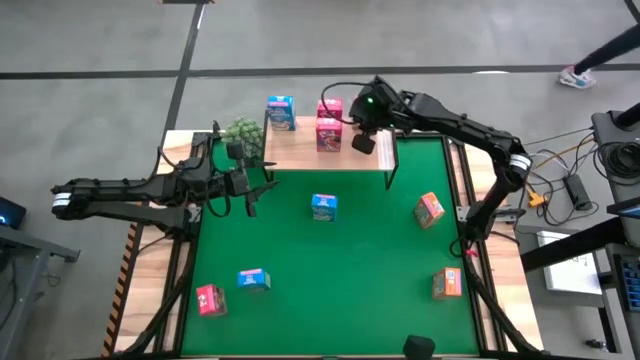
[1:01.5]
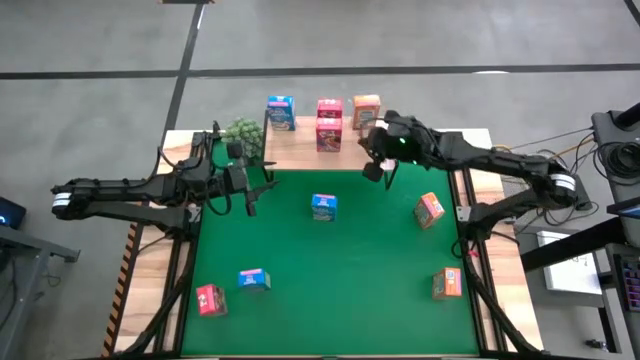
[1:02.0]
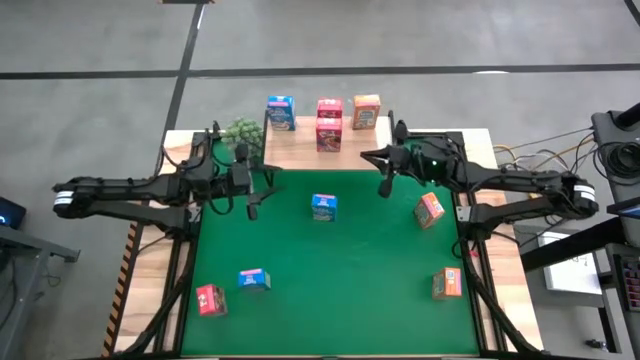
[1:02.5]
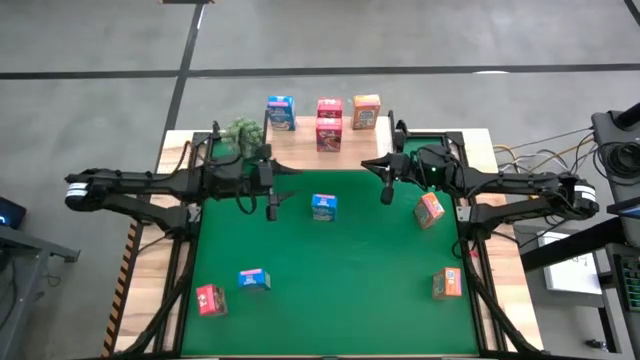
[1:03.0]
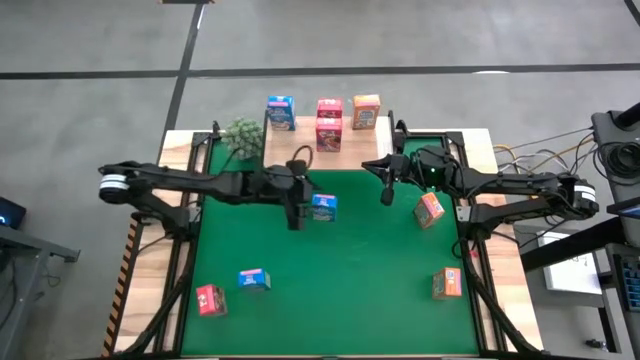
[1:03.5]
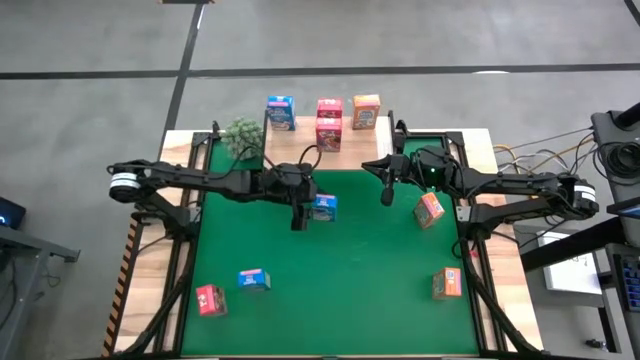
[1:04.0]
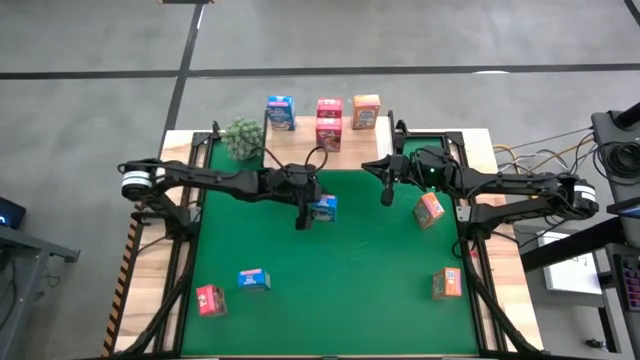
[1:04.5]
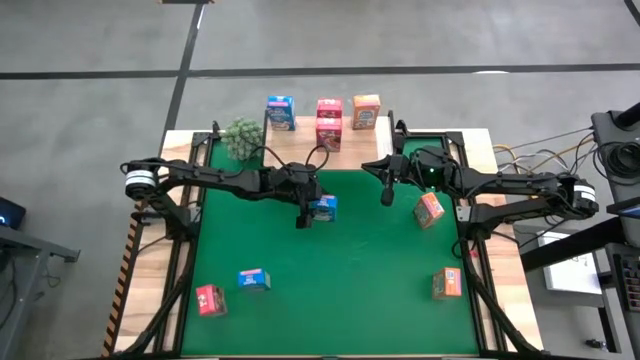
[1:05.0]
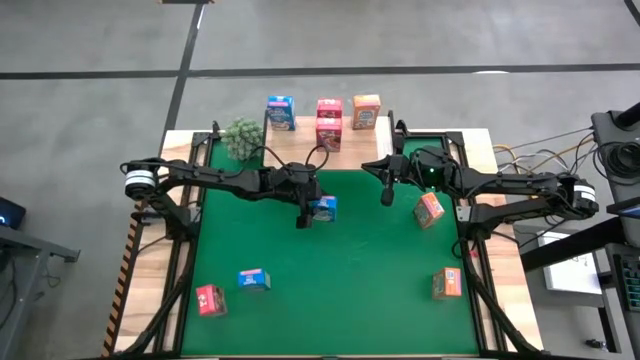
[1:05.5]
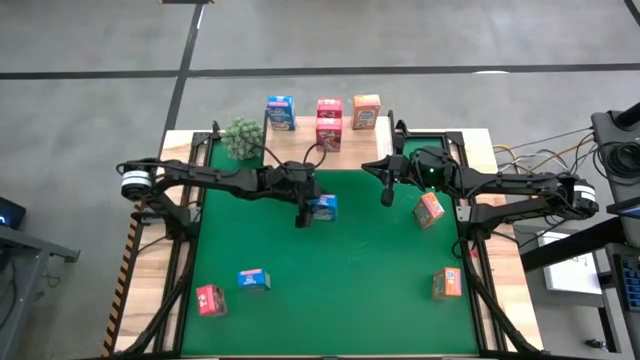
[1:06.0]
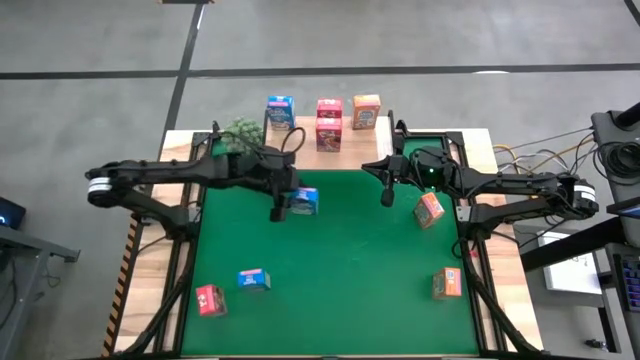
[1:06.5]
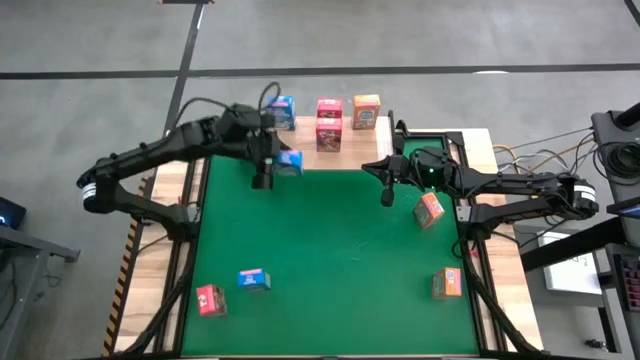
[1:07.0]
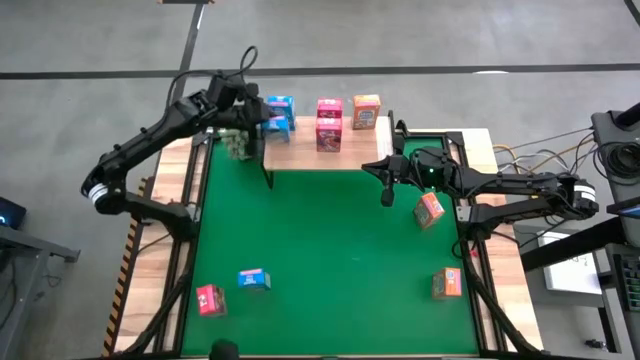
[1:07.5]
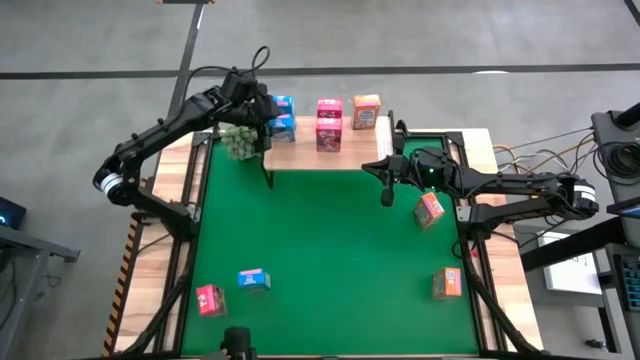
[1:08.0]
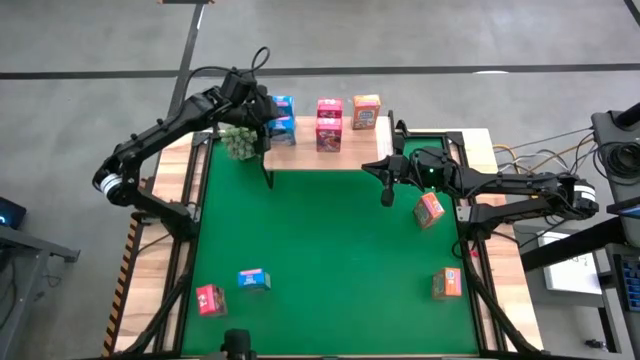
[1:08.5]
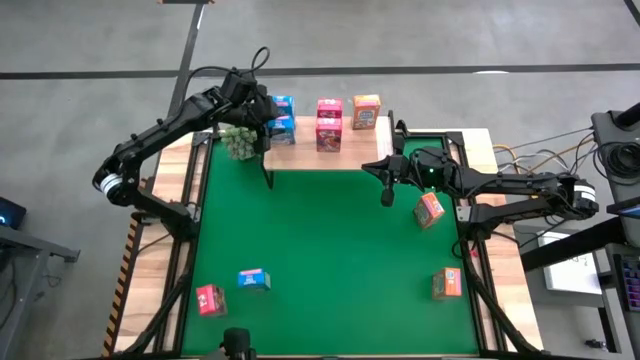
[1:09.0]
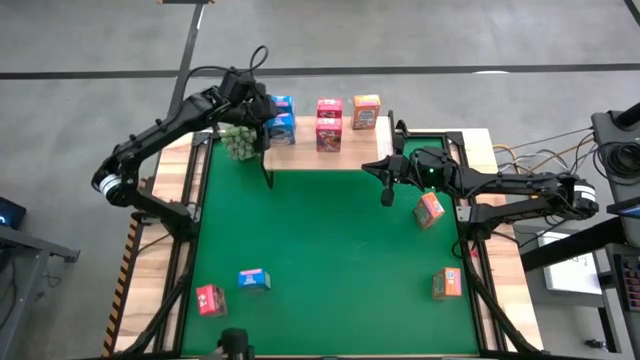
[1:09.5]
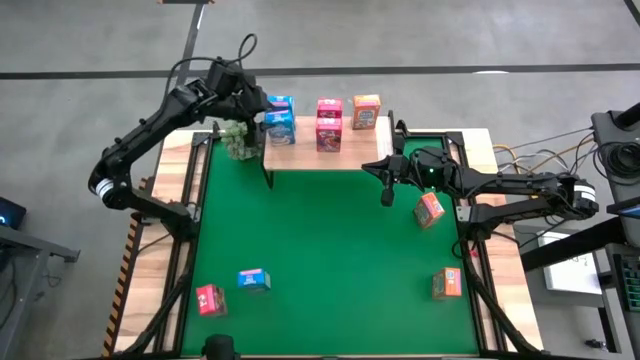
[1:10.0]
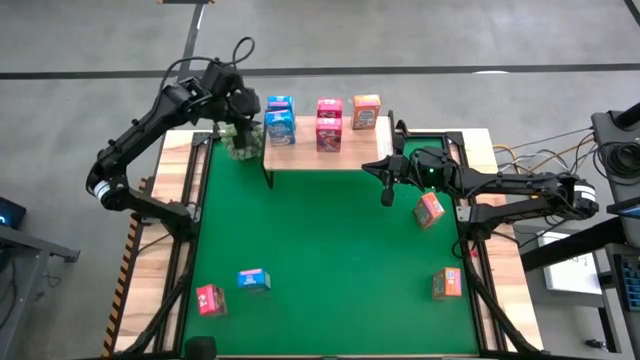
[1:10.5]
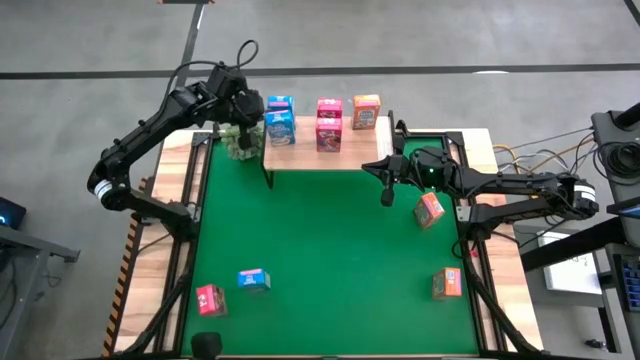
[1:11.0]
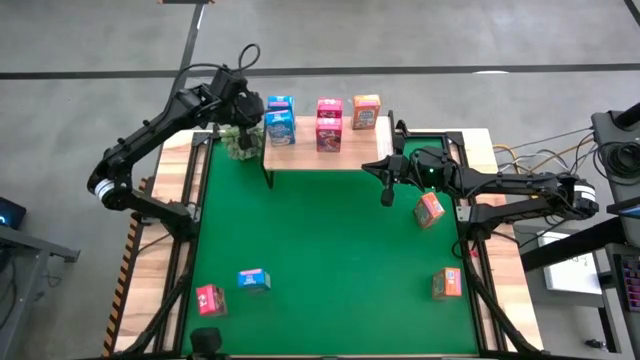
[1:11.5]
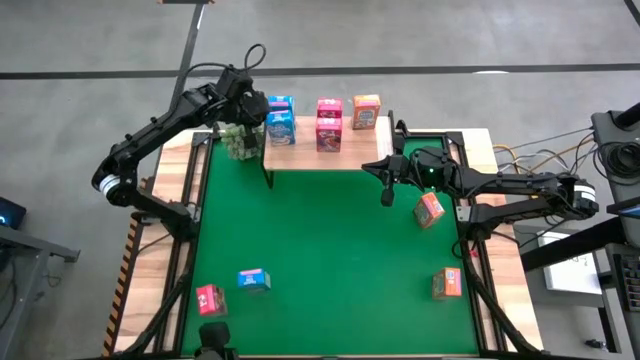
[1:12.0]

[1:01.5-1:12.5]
Task: Stack cereal on shelf
Put the top blue cereal box on the shelf aligned with the other blue cereal box

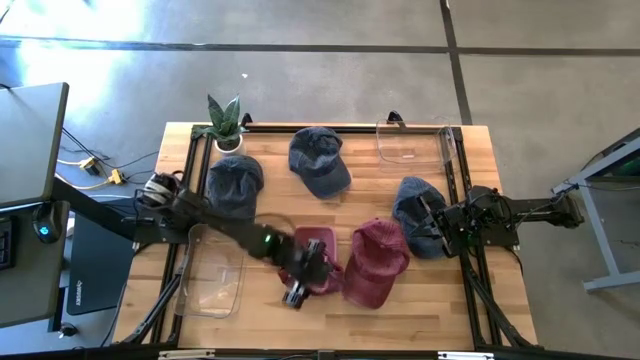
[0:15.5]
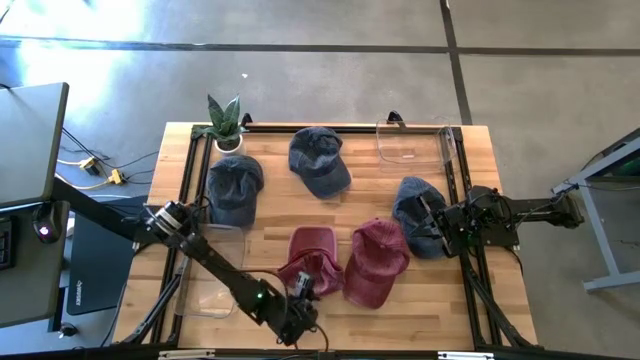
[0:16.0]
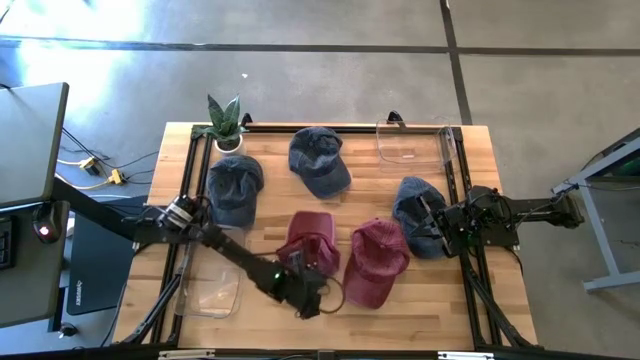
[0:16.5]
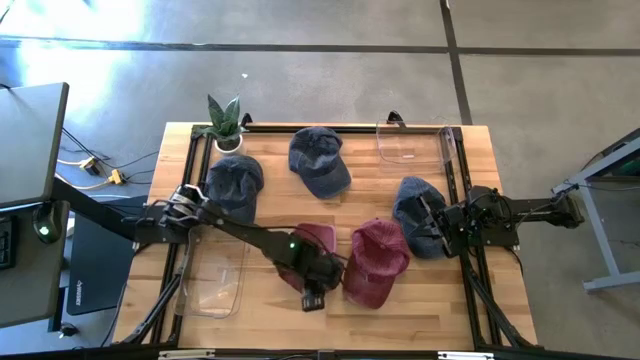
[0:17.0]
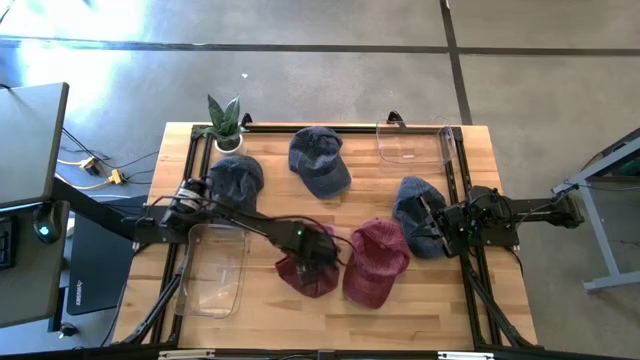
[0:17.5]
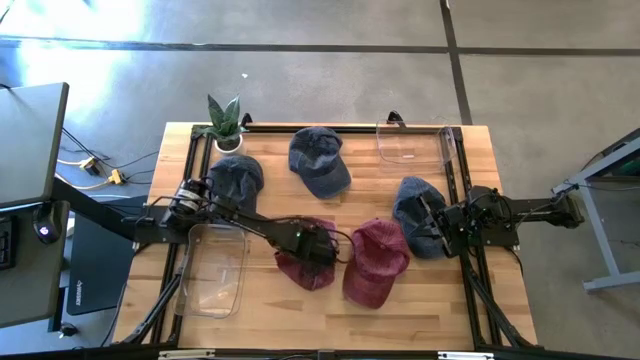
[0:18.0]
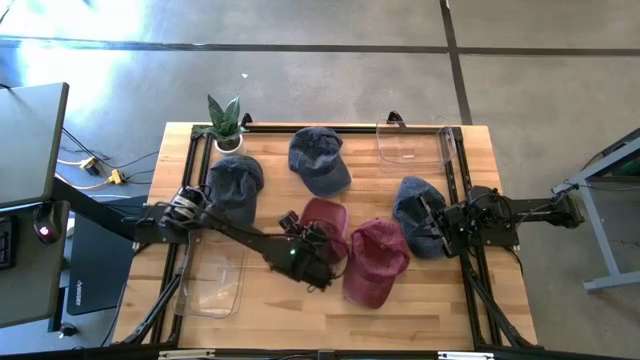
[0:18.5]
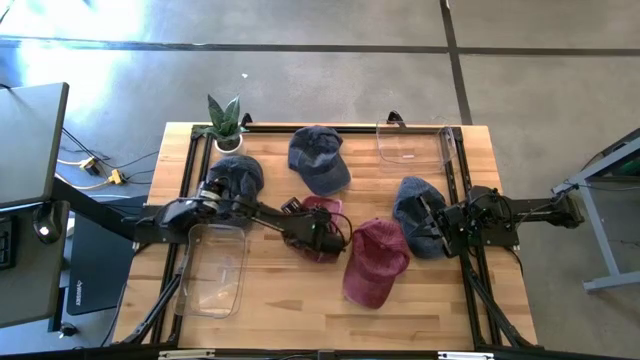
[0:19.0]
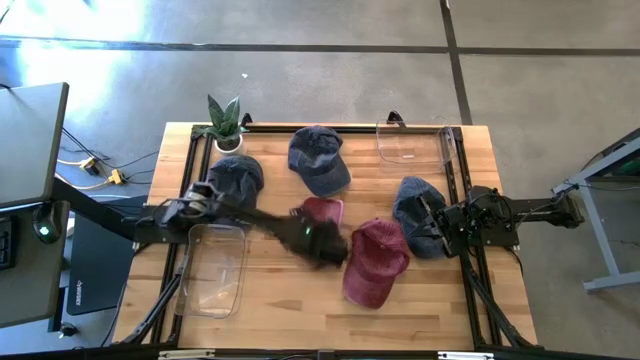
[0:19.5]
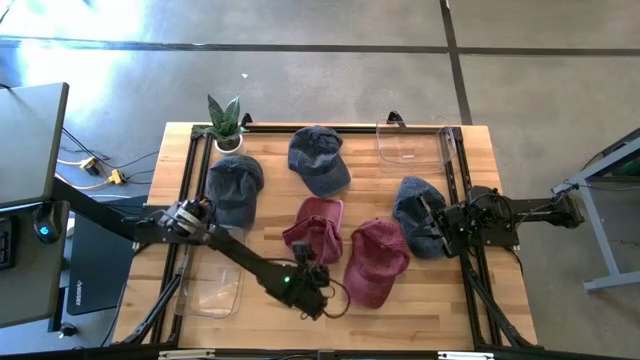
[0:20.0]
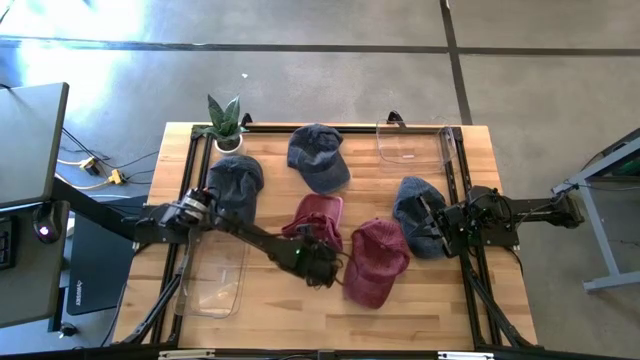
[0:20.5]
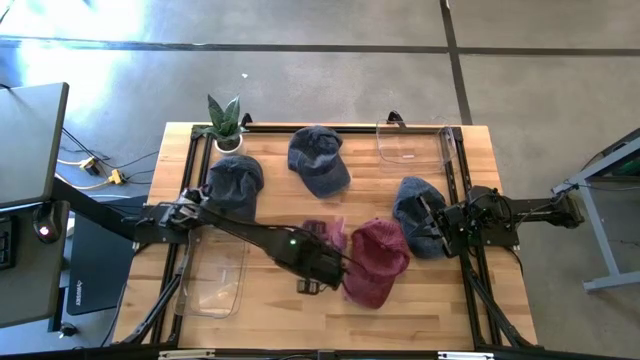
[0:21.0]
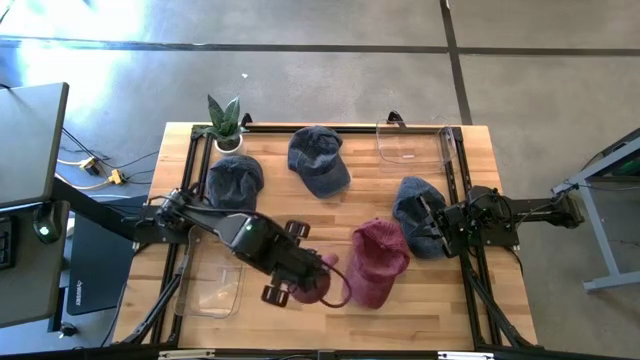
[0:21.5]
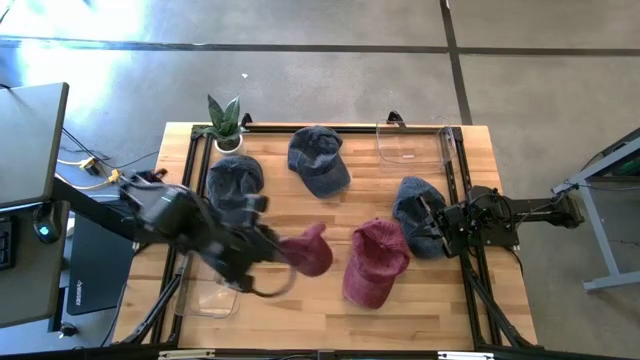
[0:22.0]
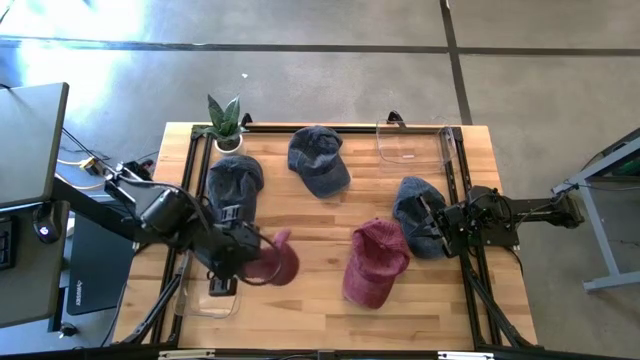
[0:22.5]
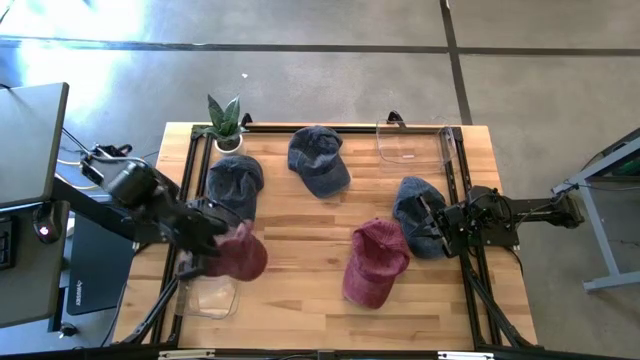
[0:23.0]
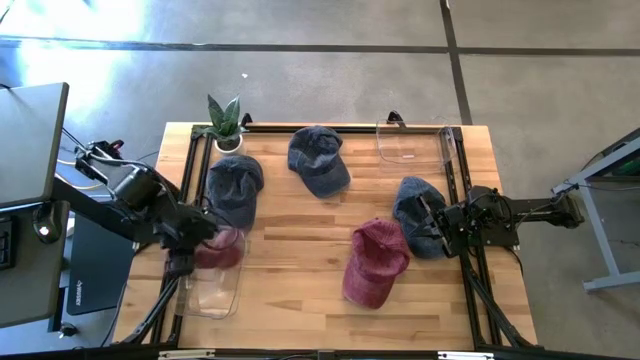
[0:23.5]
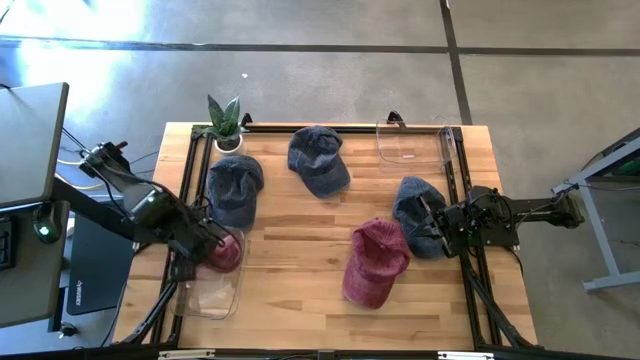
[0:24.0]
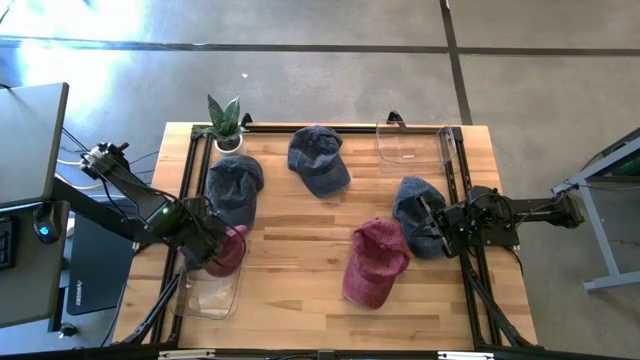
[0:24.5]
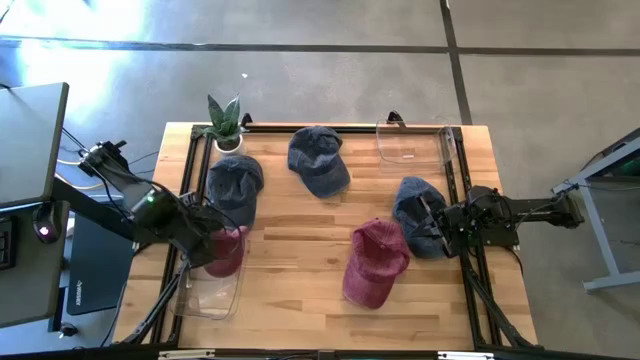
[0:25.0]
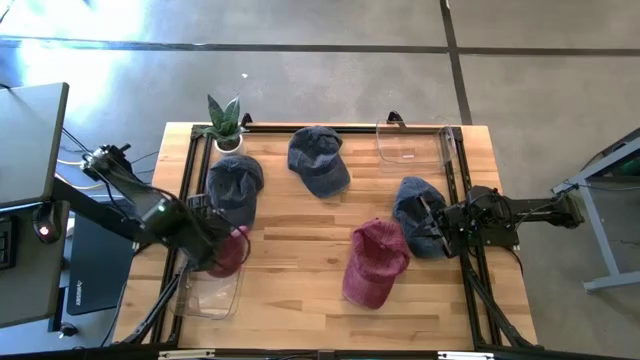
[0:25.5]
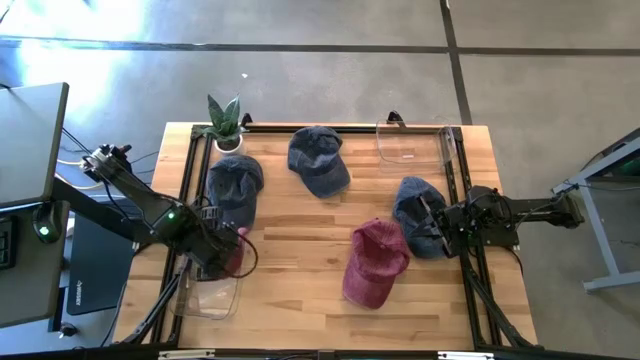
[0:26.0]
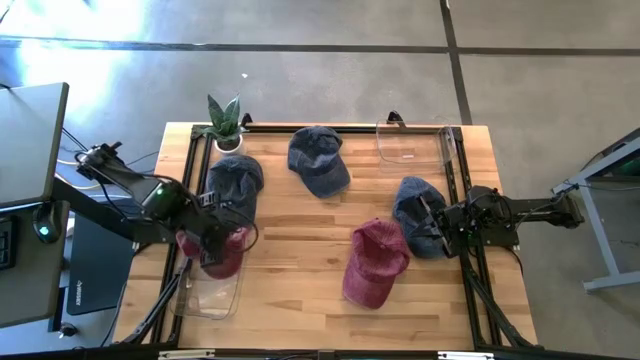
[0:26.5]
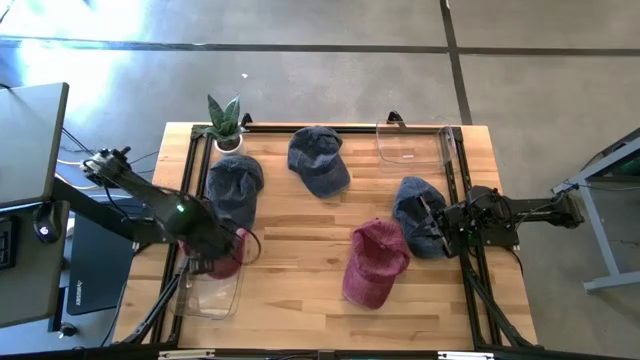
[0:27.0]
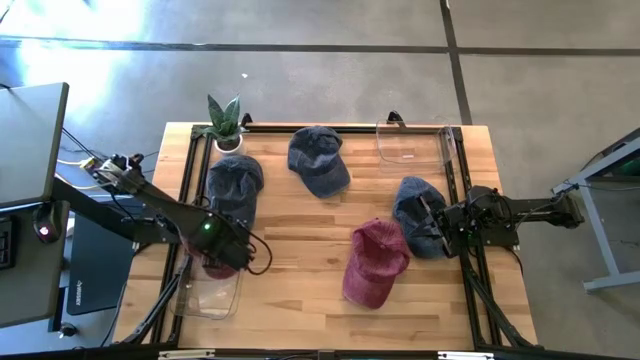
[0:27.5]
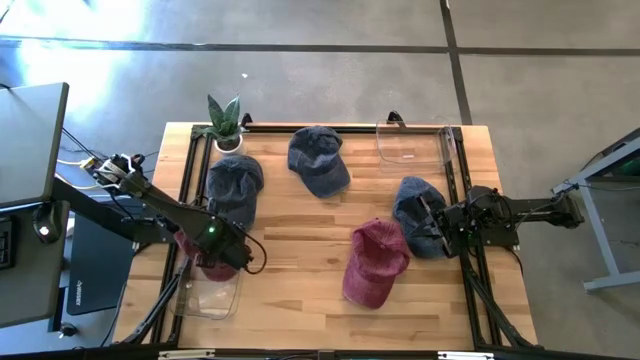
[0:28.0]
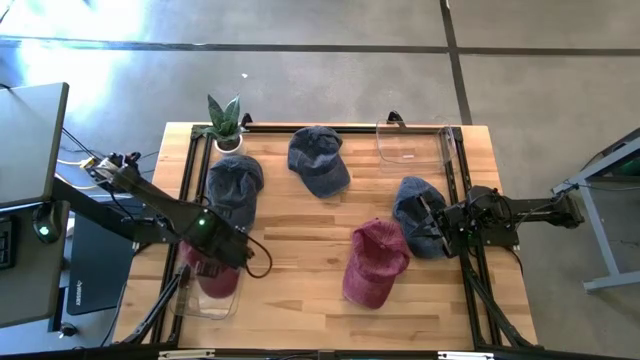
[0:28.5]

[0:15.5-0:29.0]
Task: Pick & Place hat
Put the left red cap into the bottom transparent bin
